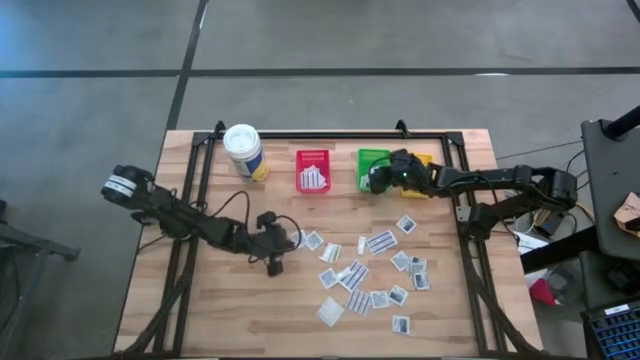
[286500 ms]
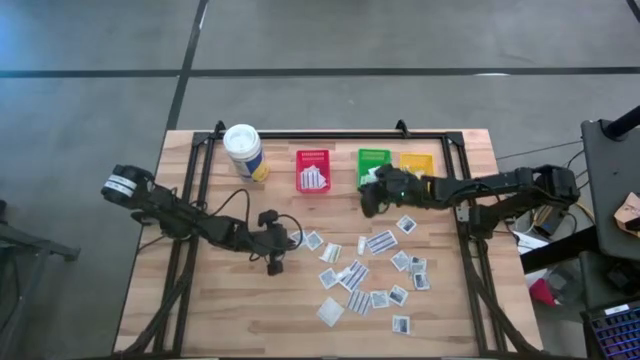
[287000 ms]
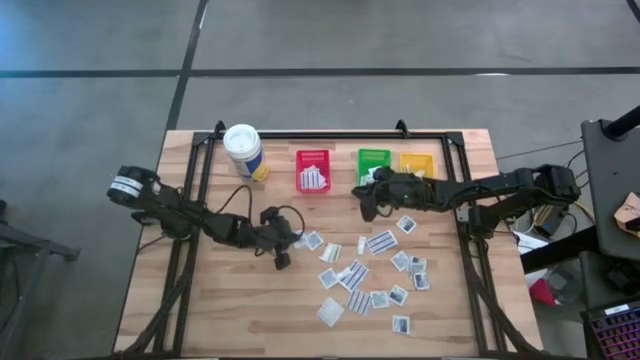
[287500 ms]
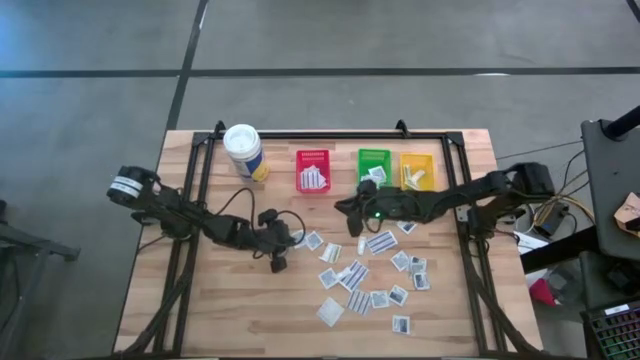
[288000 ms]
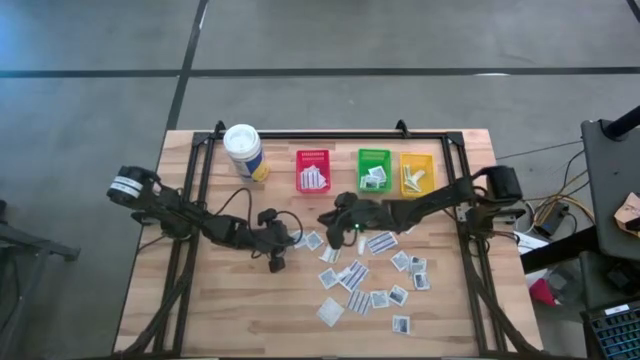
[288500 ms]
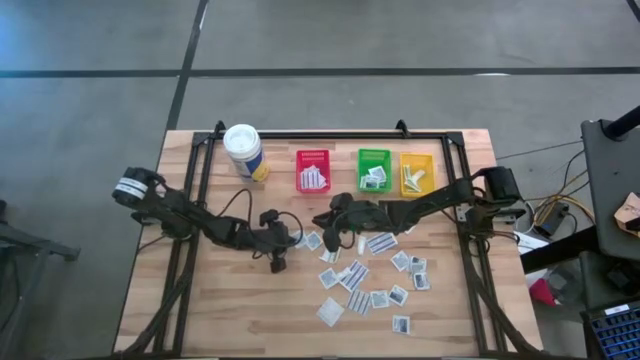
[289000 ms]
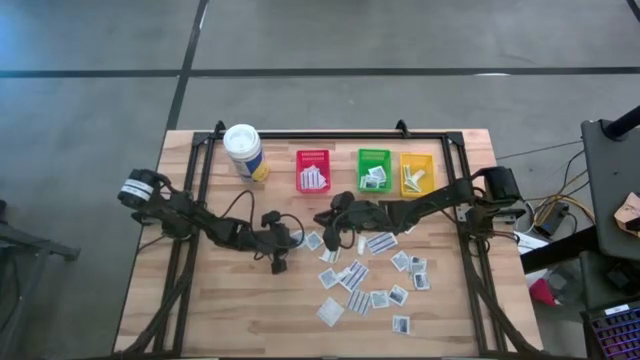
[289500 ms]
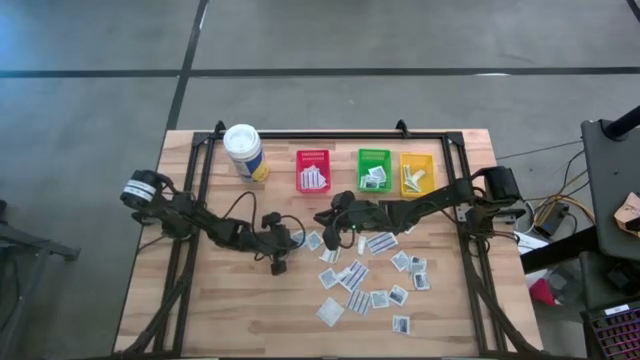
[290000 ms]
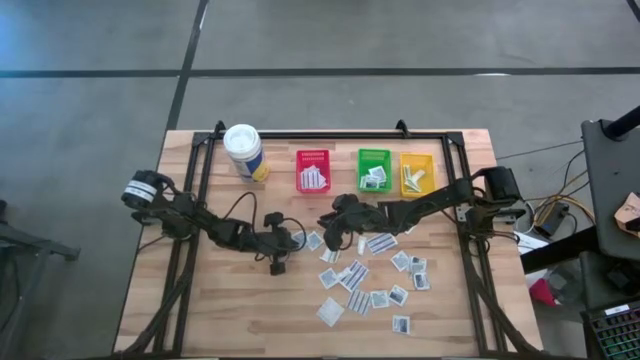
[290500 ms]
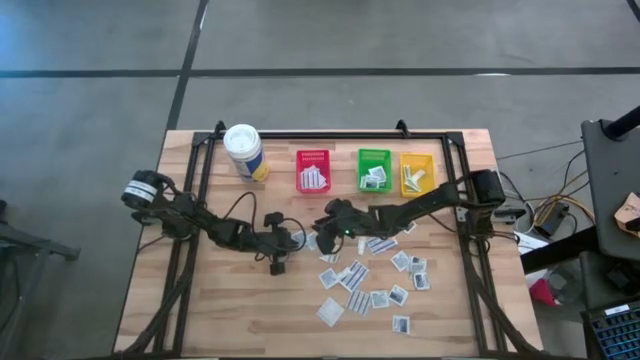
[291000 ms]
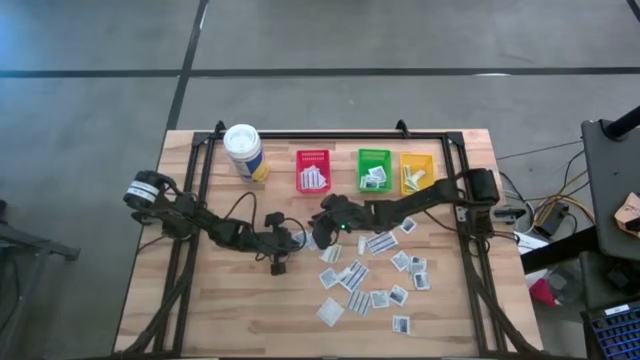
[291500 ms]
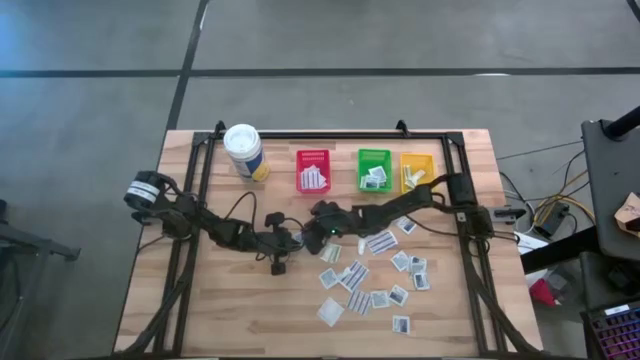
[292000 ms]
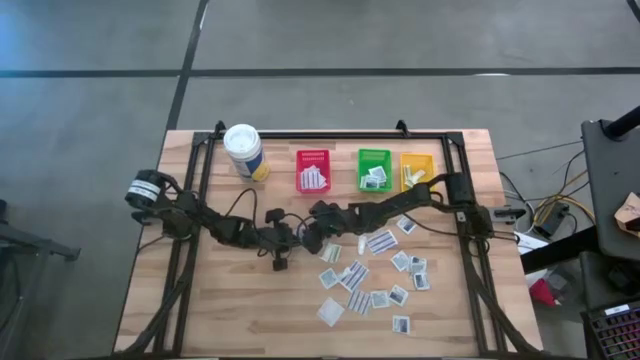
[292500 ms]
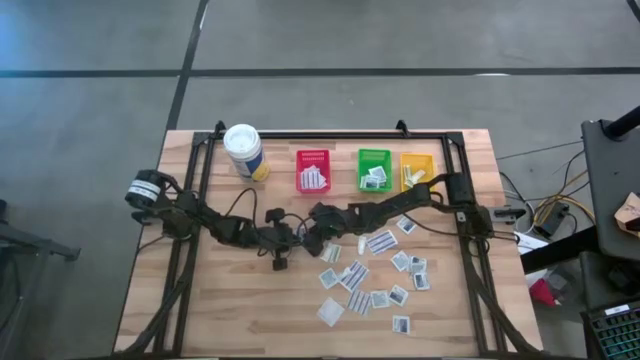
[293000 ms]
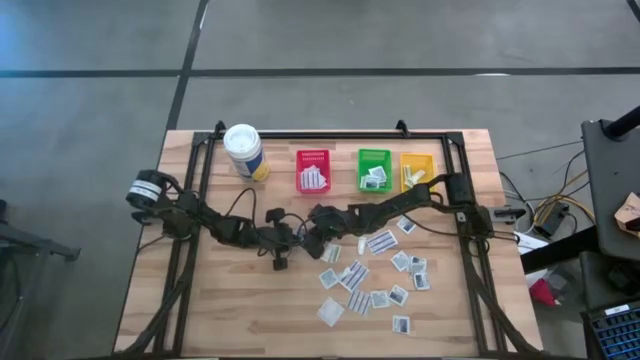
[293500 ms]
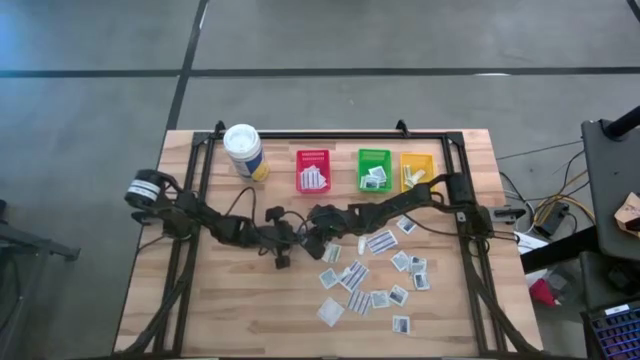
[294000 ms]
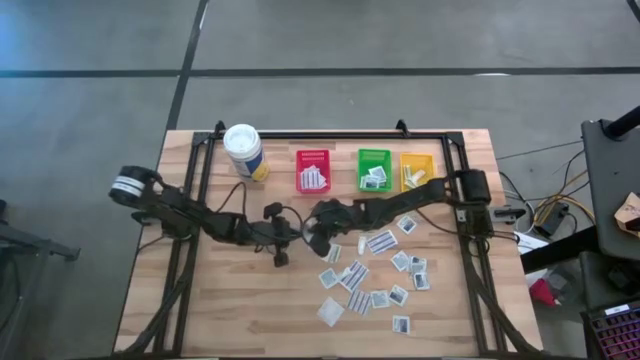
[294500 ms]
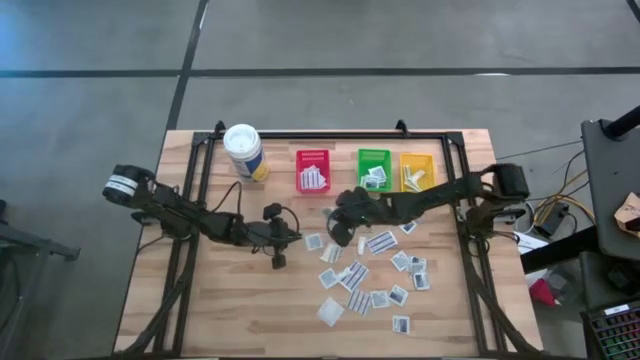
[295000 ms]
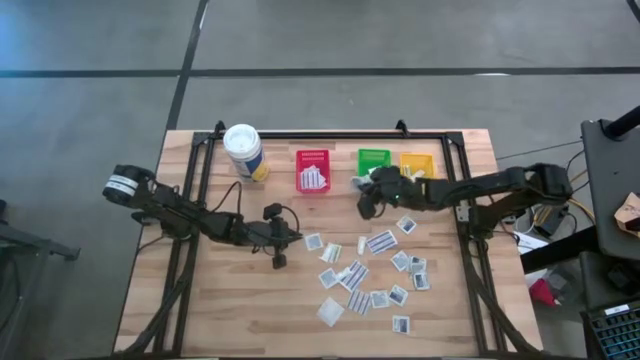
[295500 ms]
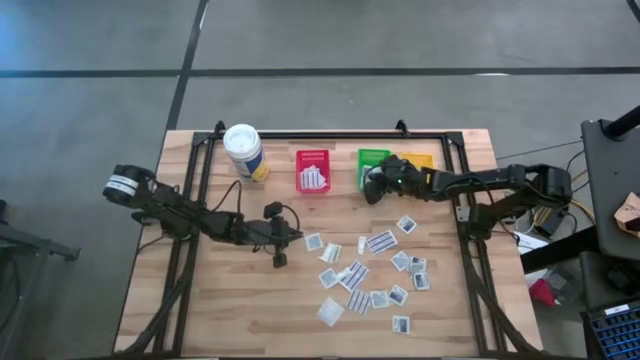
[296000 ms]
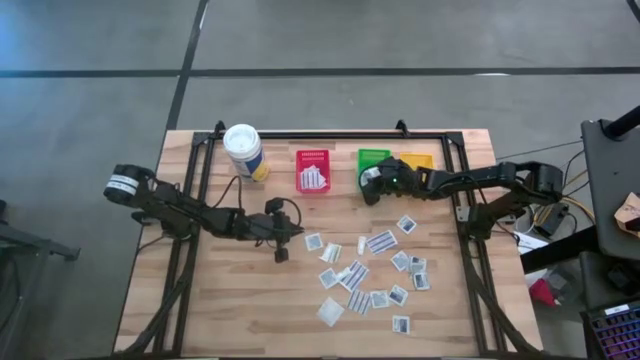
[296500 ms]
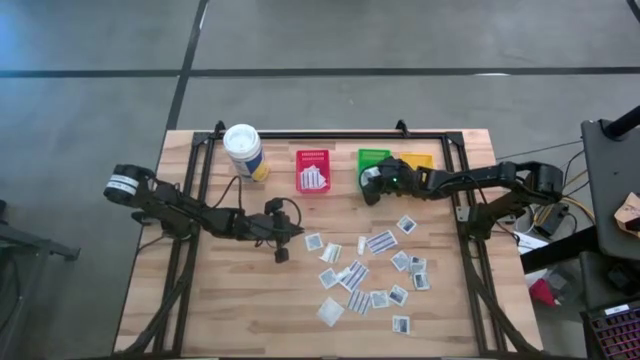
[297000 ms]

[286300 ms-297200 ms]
Task: Pick & Place First Aid Supplies
Put the alcohol pad in the green bin

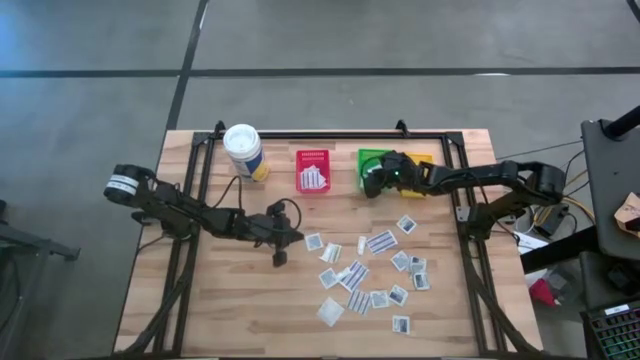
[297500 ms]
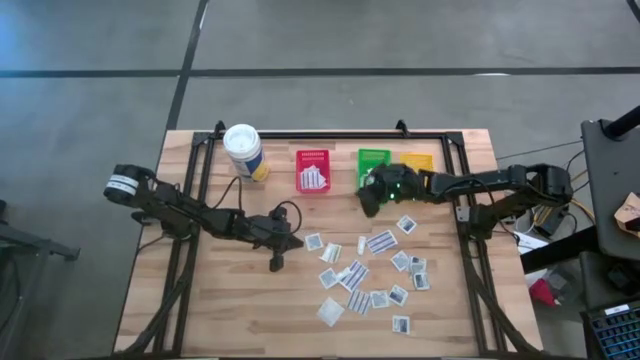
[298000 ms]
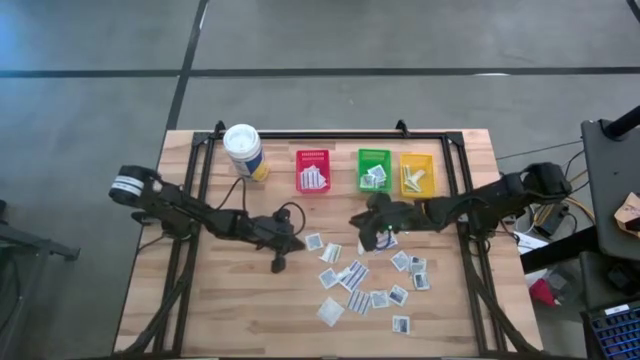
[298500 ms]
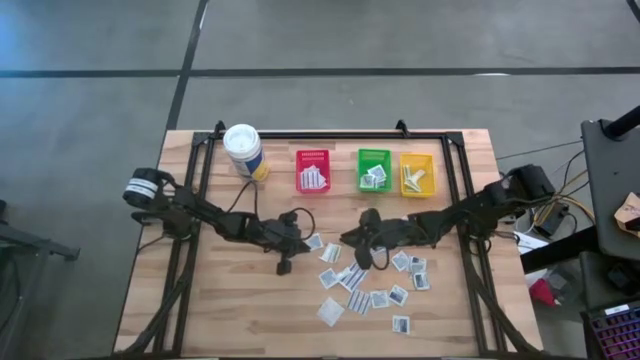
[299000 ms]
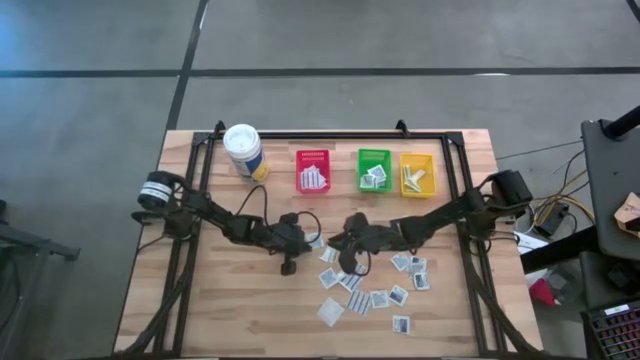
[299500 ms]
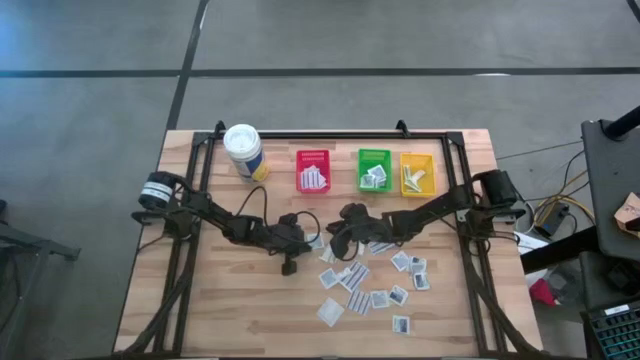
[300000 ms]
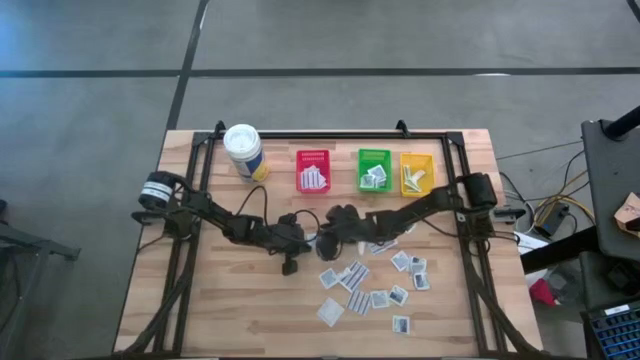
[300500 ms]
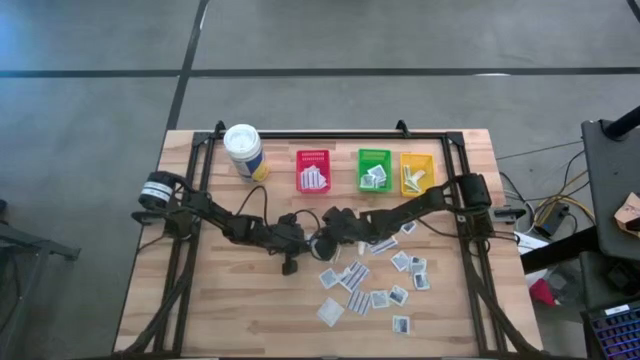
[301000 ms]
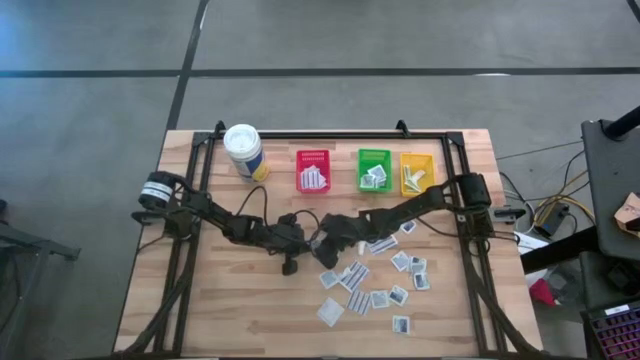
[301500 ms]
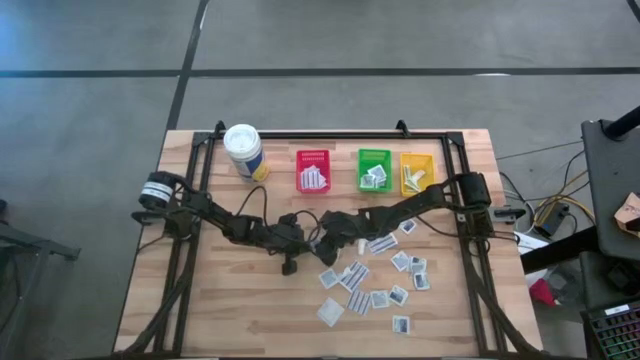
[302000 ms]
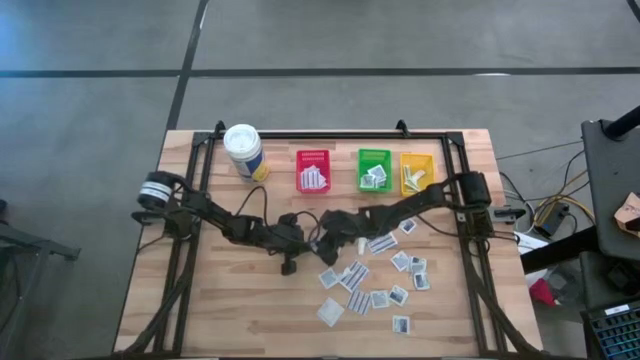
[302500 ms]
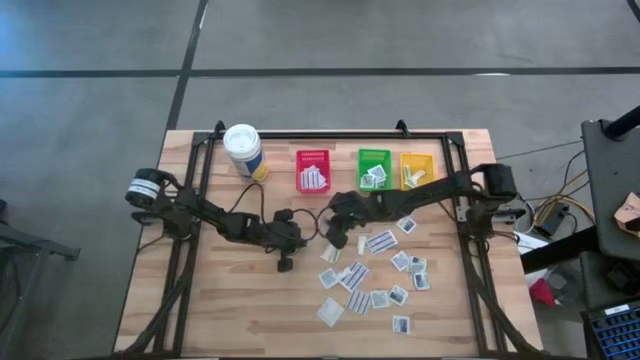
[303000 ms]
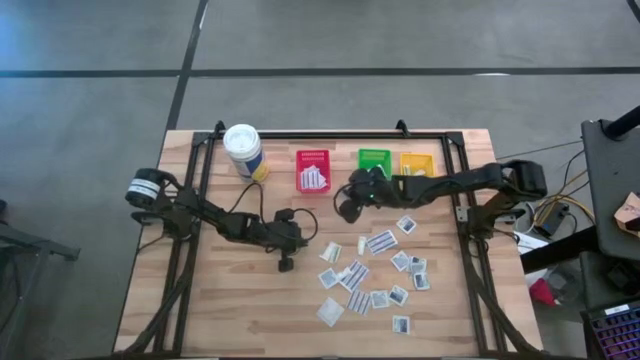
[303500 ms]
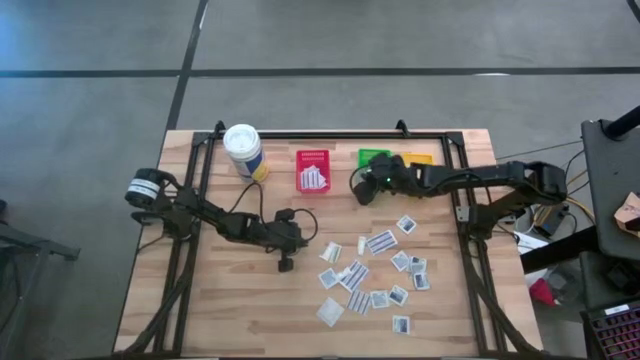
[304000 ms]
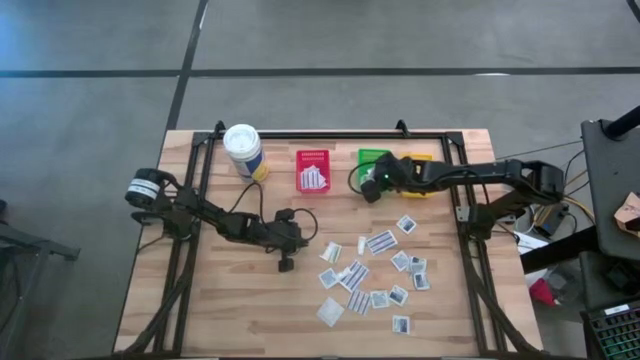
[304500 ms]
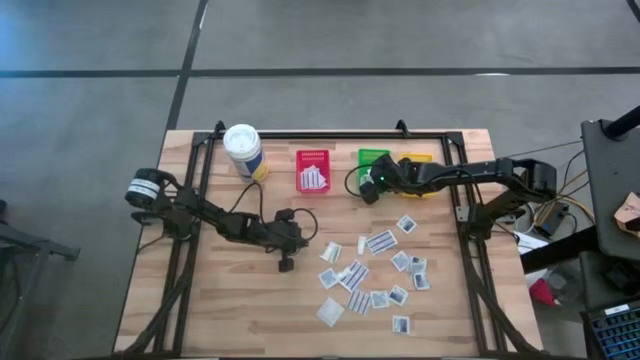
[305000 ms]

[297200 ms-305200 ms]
Put the alcohol pad in the green bin

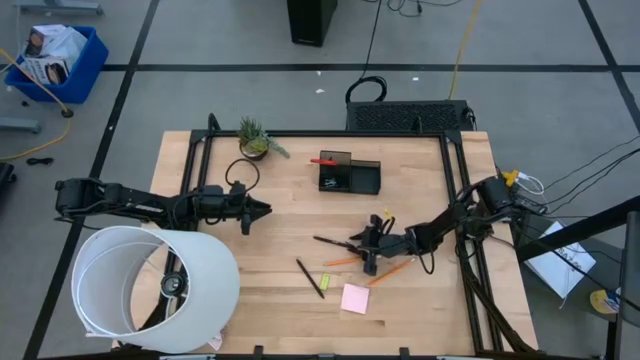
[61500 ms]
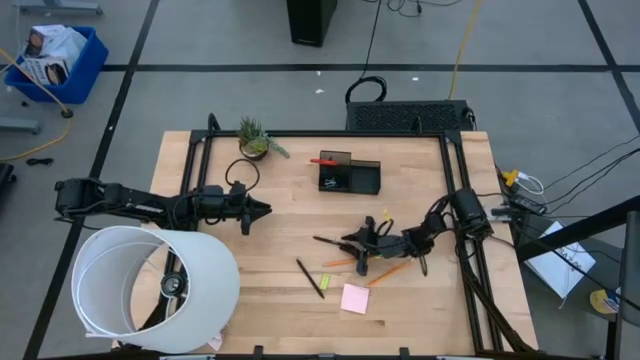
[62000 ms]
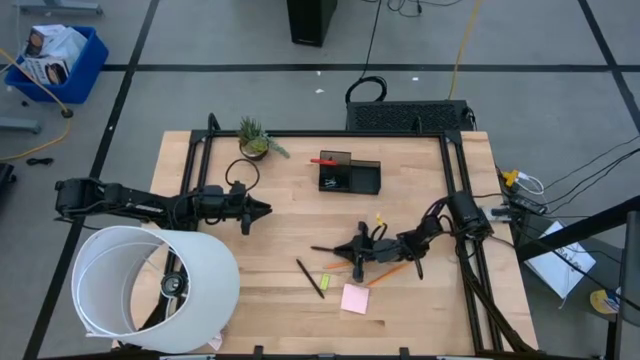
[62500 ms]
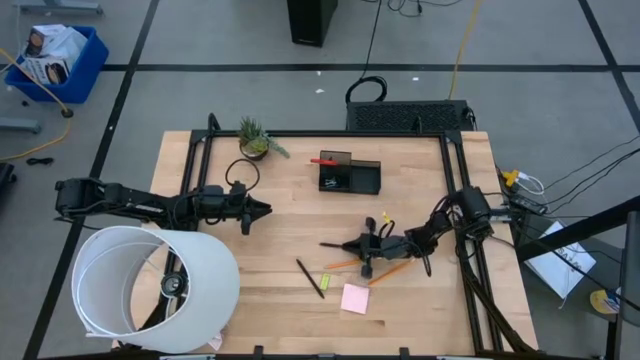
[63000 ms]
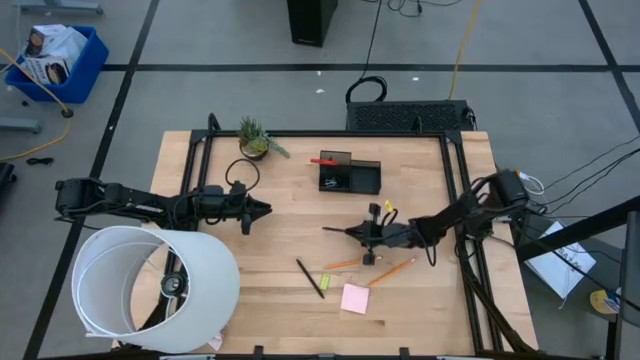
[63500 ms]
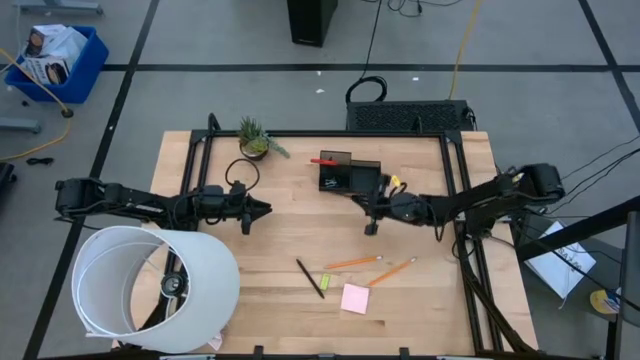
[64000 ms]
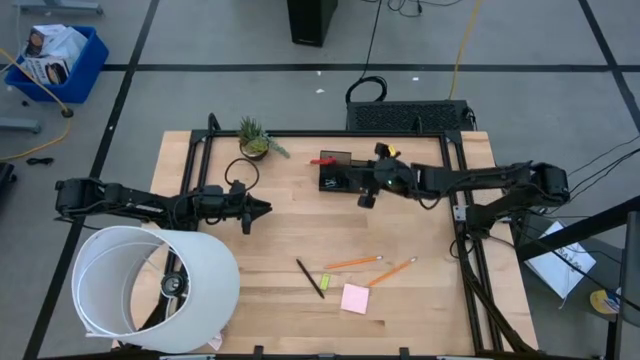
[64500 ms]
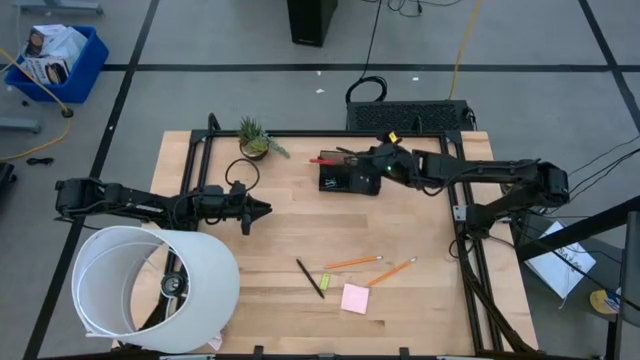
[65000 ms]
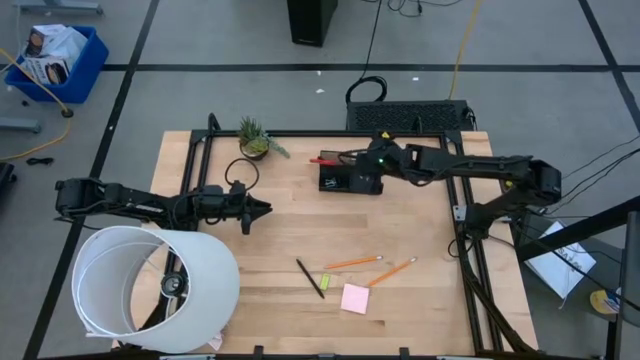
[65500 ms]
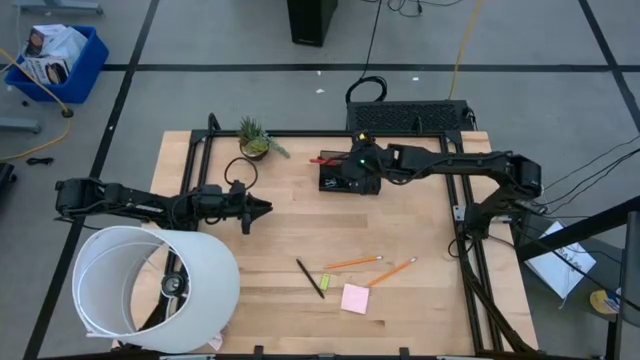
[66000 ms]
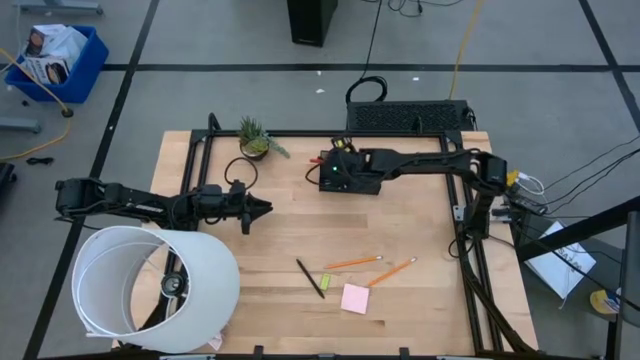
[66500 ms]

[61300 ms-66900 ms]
Task: Pick and place office supplies into organizer
Put the black pen into the desk organizer
